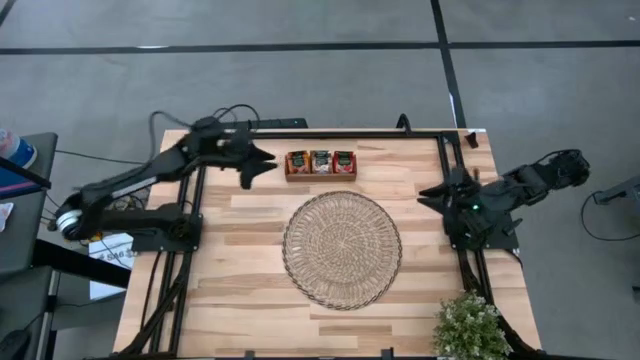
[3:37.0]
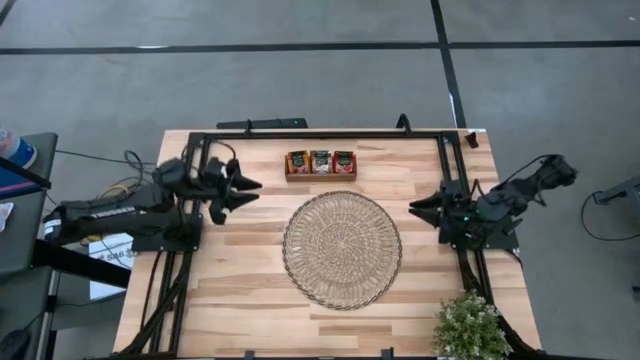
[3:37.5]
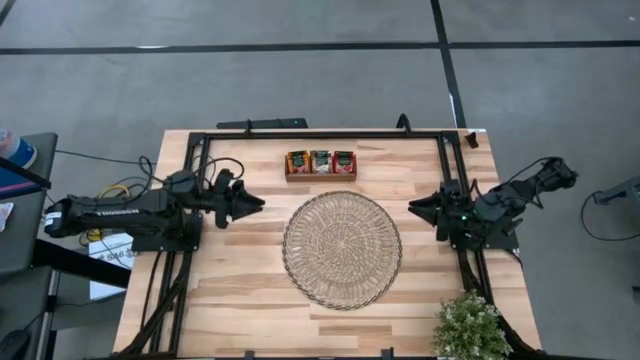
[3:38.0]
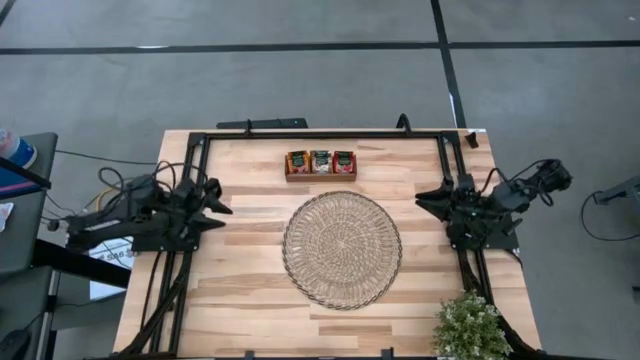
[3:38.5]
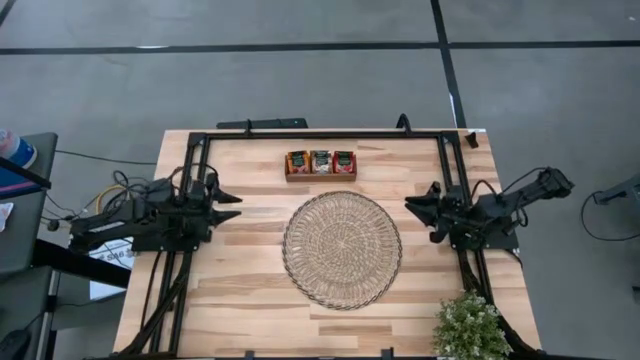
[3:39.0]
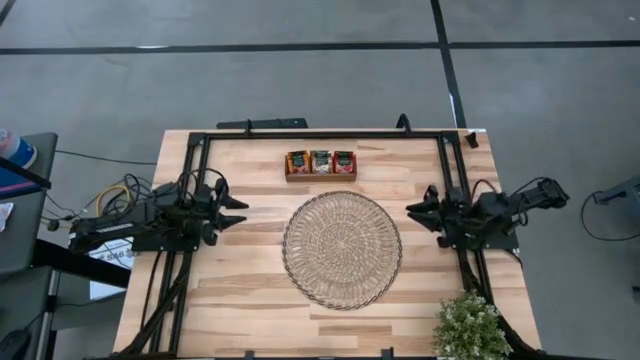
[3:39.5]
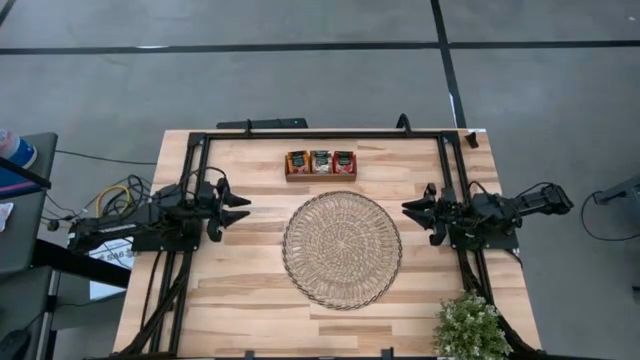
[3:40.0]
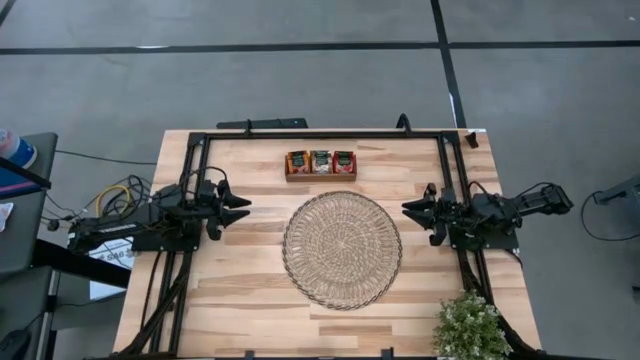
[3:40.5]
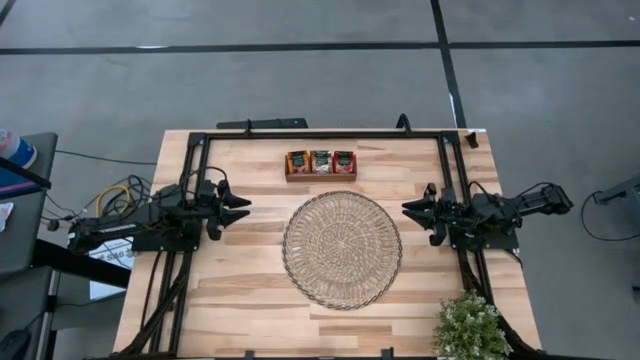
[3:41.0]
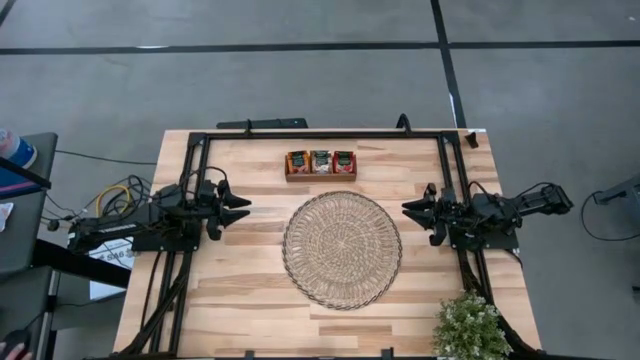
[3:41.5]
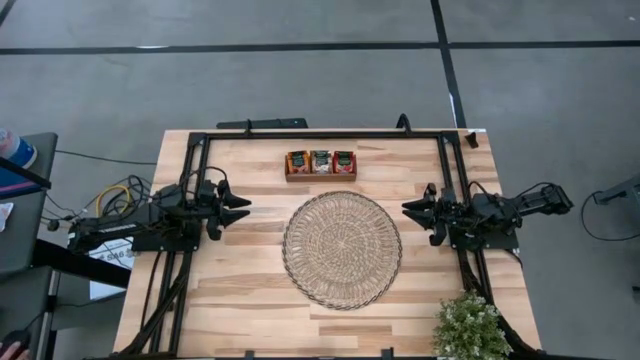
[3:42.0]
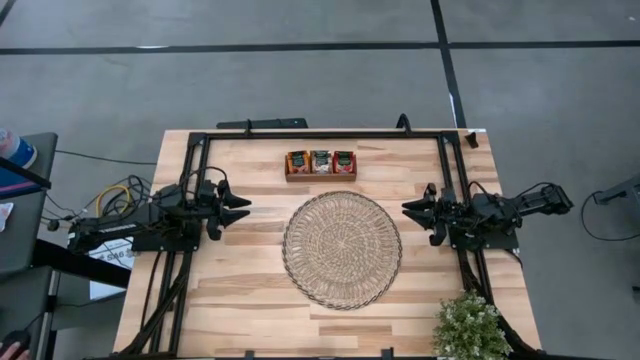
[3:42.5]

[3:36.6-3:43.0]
Task: Pick & Place Tea
Return to Home Position

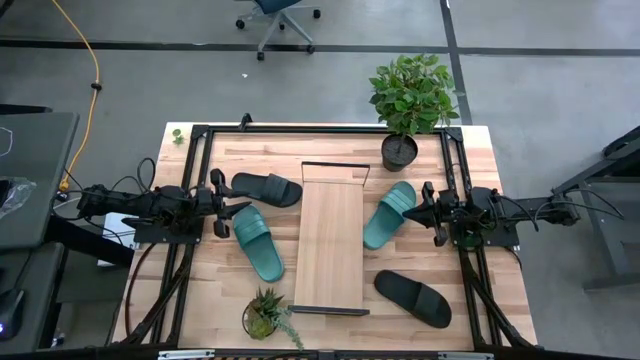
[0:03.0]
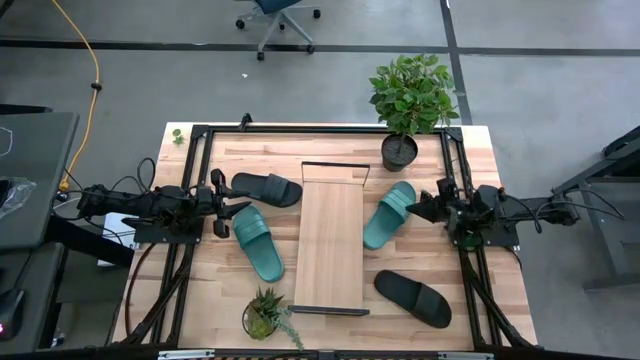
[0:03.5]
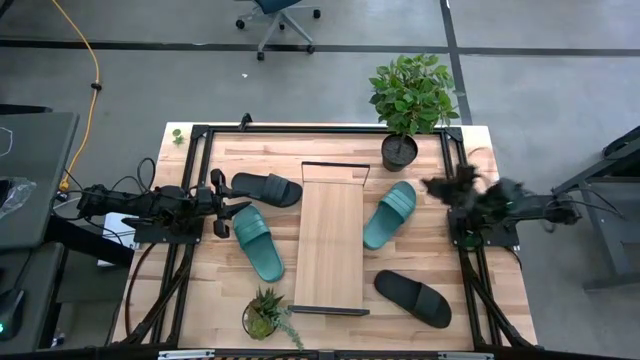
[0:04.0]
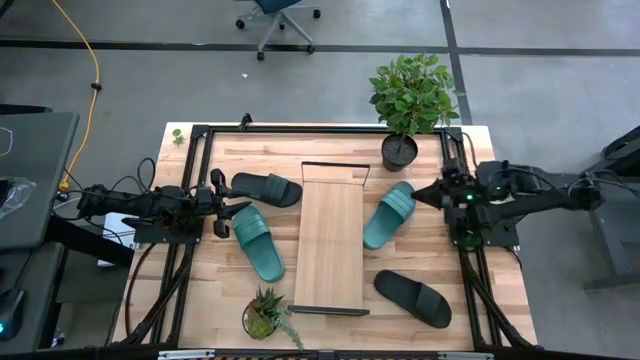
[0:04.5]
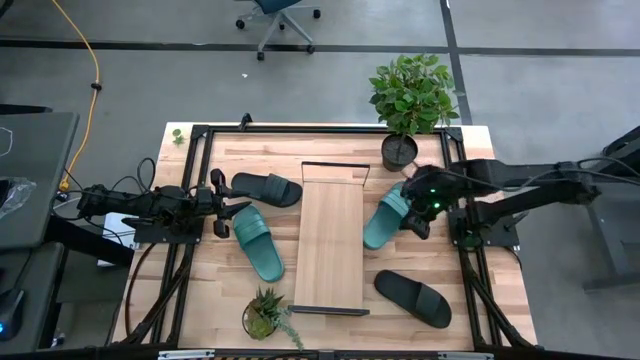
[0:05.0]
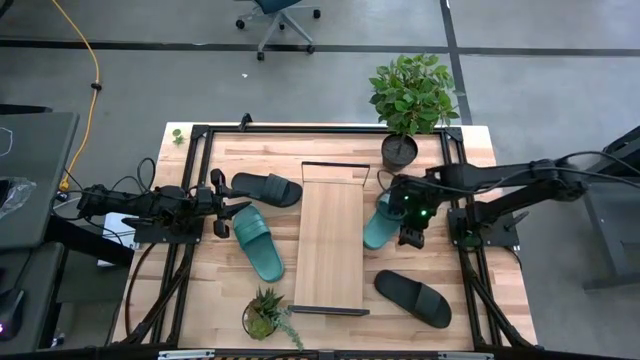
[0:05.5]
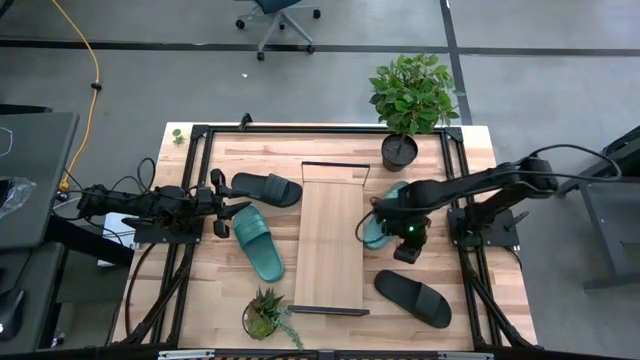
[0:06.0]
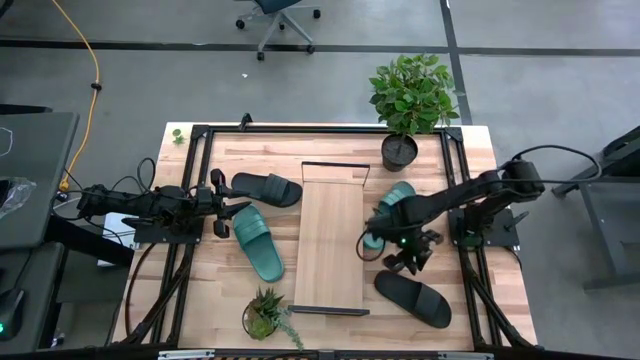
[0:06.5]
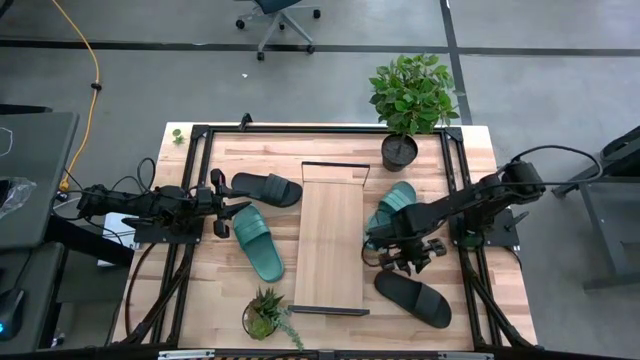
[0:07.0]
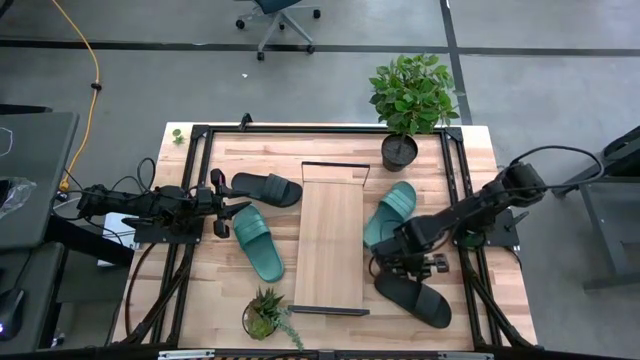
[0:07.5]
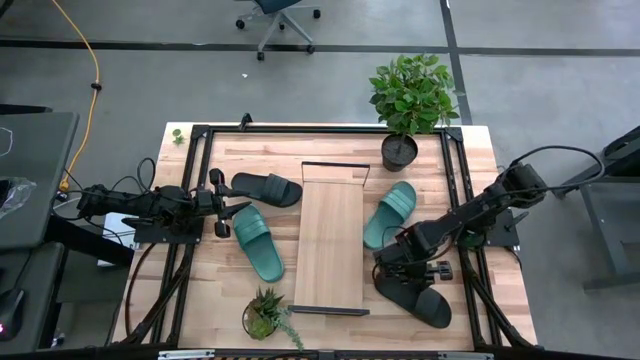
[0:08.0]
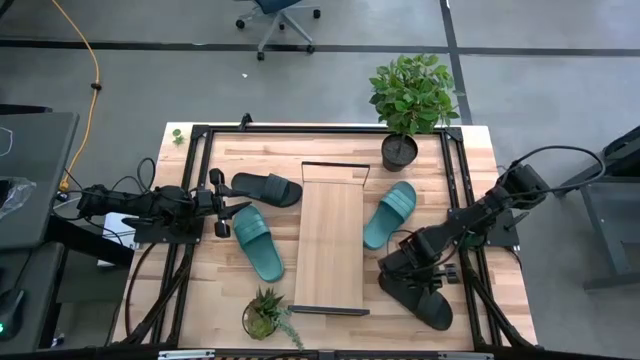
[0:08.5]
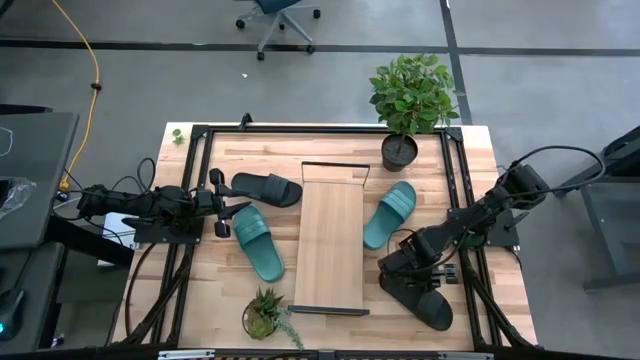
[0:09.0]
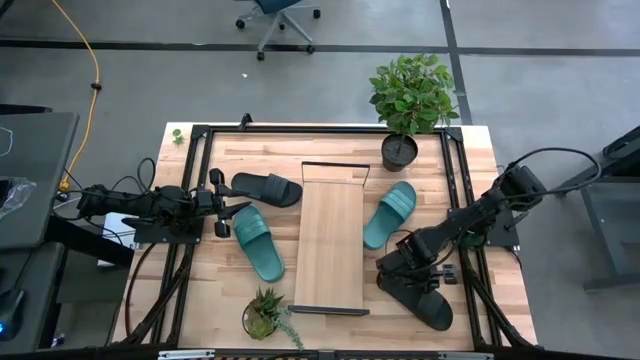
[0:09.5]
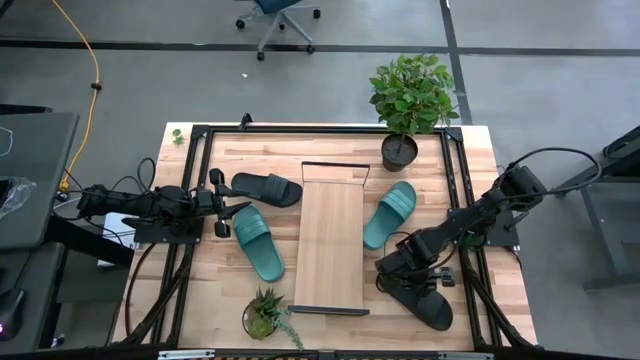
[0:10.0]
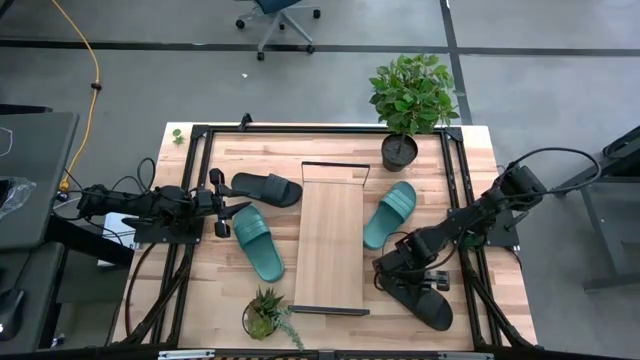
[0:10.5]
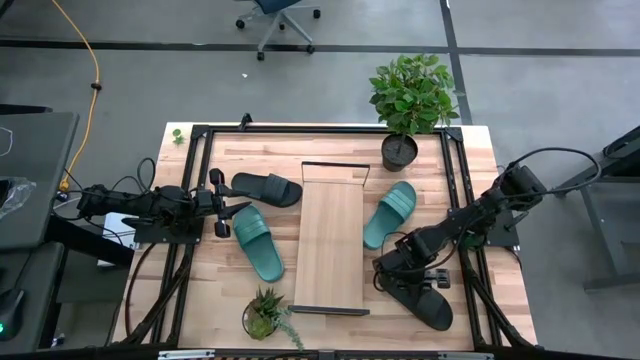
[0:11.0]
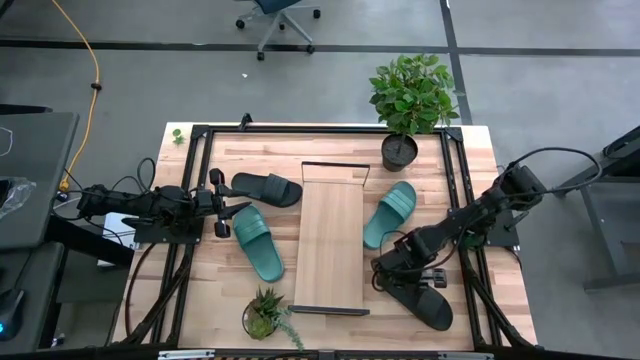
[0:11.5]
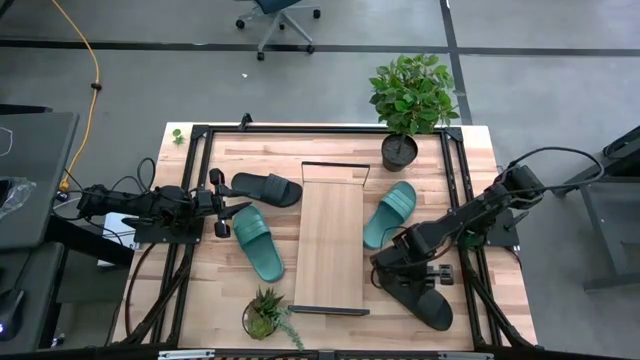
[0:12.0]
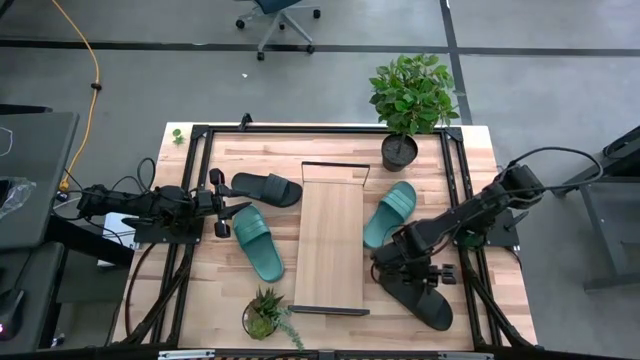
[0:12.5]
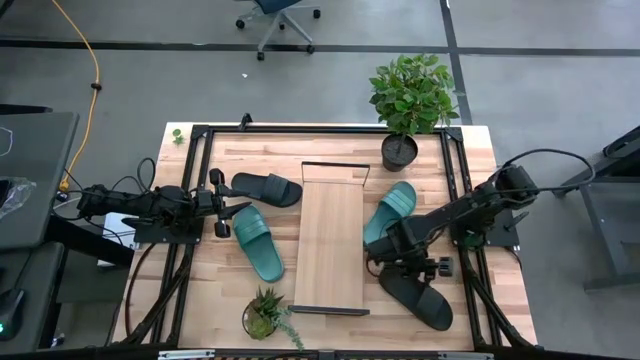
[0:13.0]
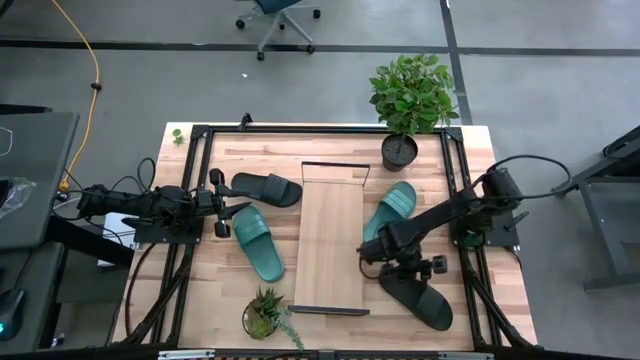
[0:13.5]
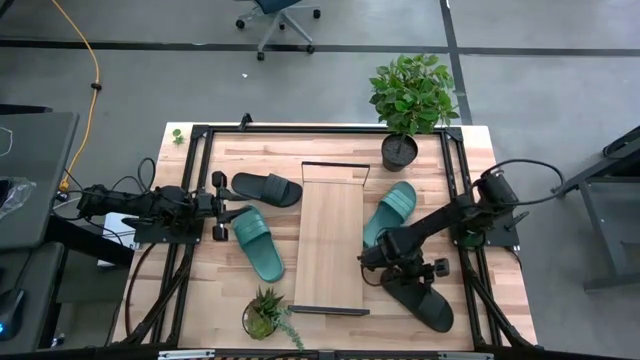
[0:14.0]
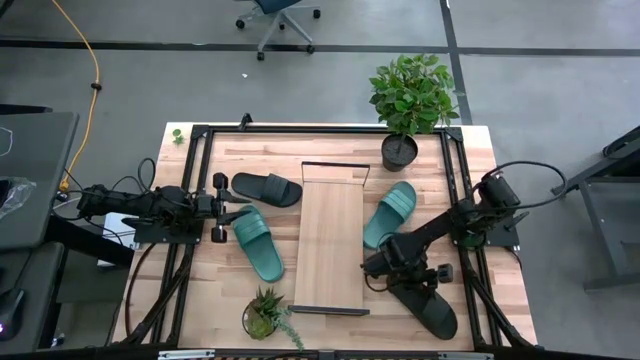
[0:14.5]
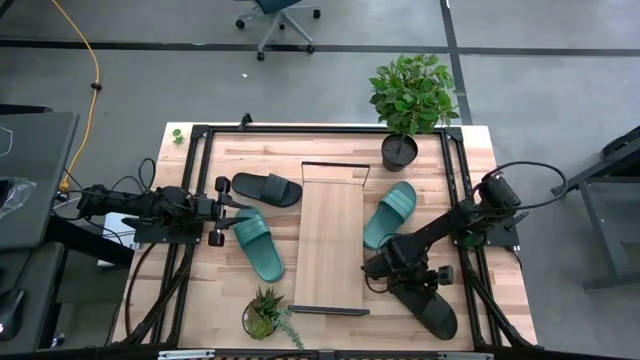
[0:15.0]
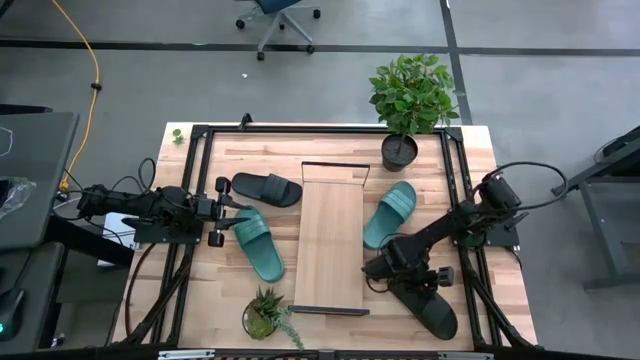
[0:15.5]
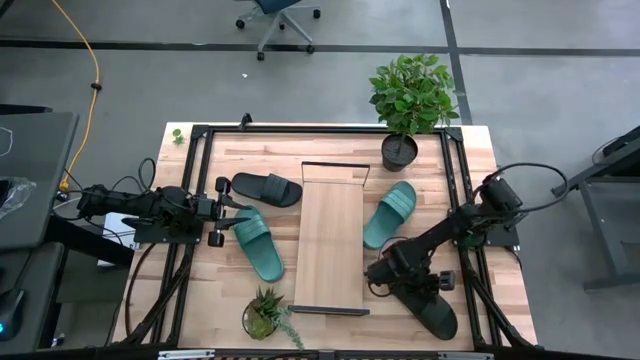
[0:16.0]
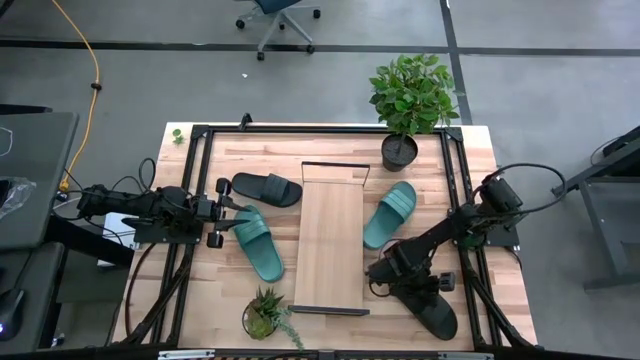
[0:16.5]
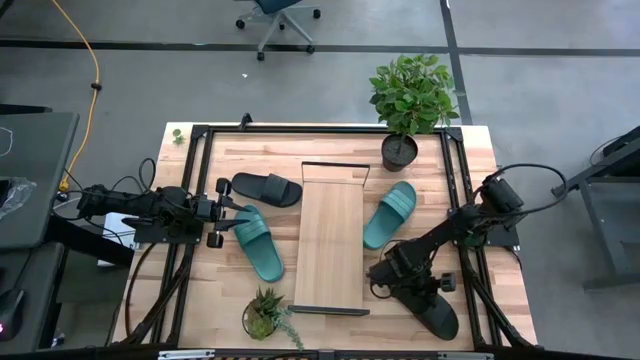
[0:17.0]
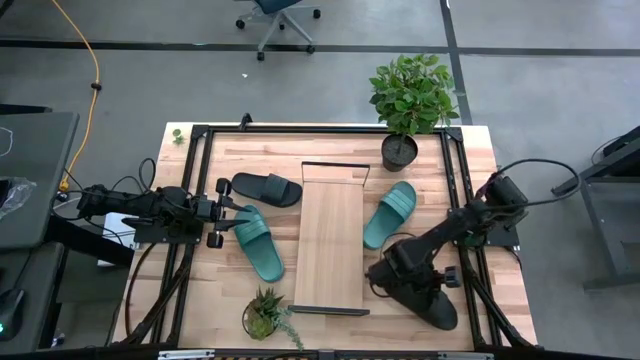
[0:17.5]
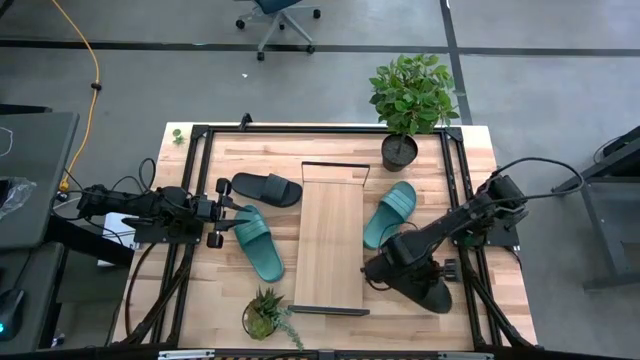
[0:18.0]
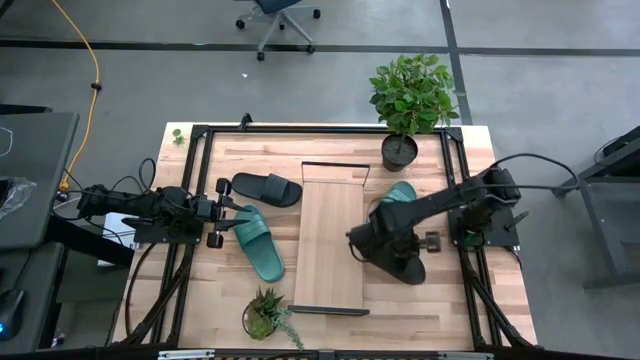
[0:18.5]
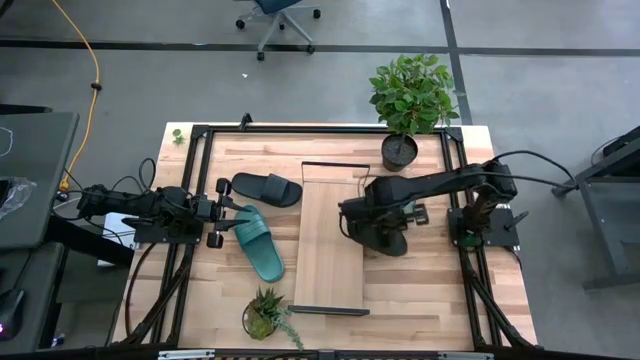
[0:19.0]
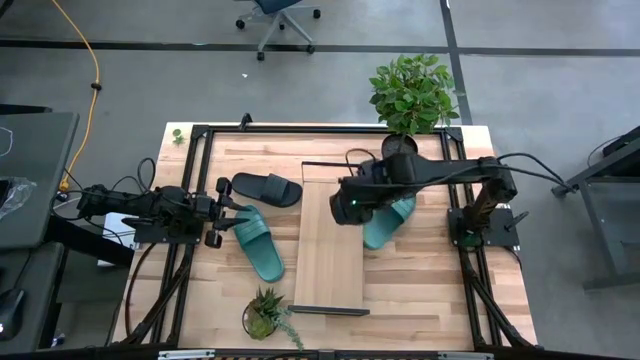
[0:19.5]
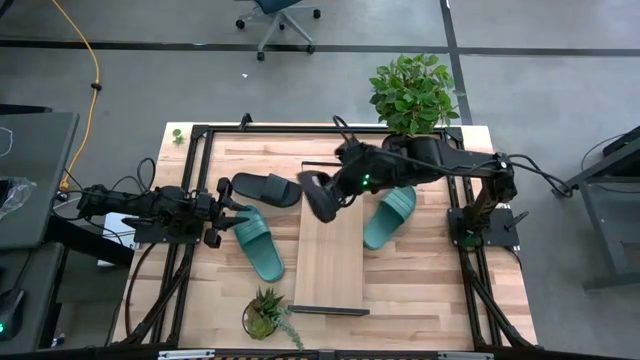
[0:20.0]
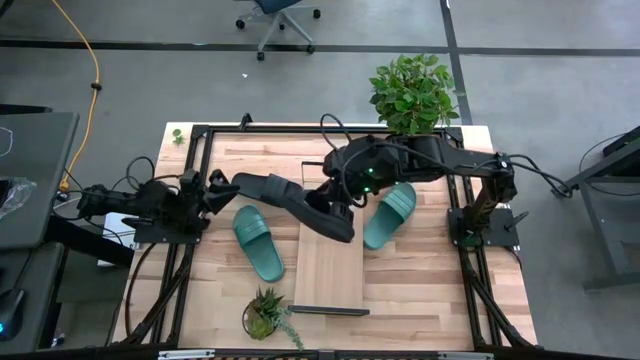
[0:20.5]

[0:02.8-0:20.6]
Task: Pick and place slides into the shelf
Put the right black slides on the shelf
